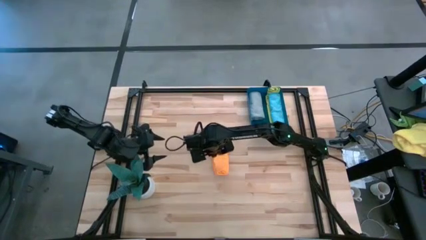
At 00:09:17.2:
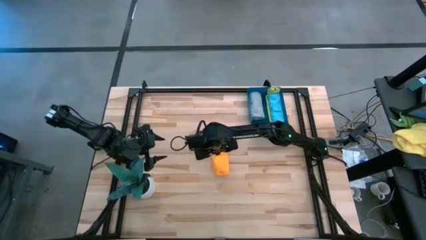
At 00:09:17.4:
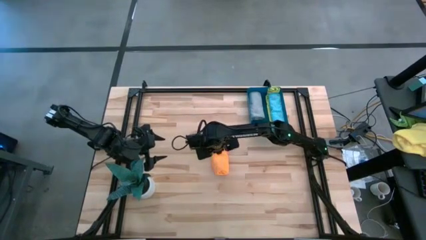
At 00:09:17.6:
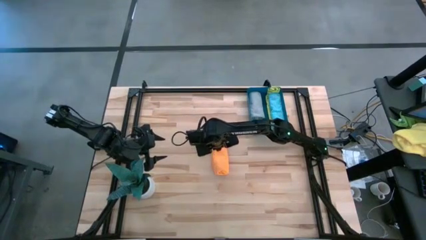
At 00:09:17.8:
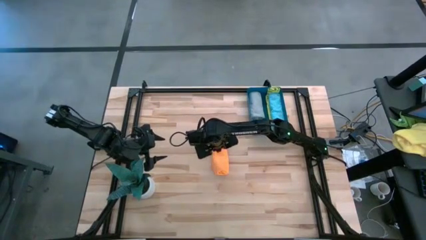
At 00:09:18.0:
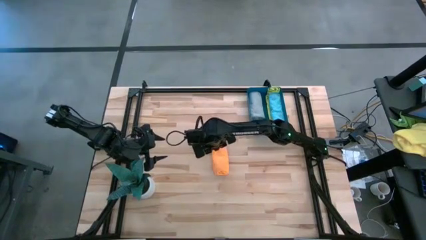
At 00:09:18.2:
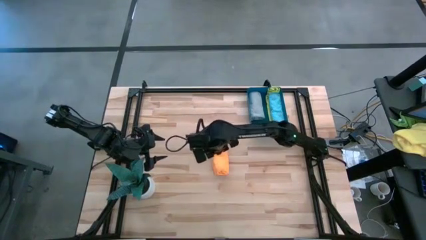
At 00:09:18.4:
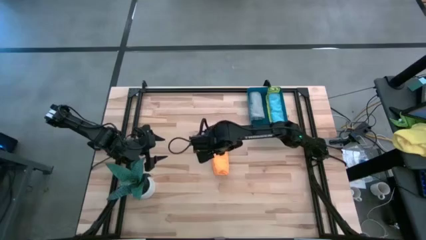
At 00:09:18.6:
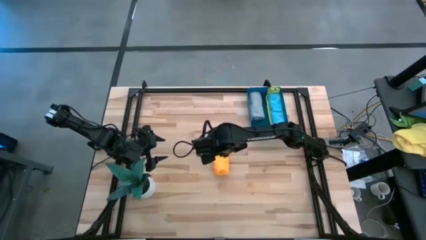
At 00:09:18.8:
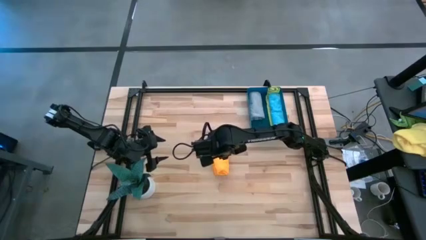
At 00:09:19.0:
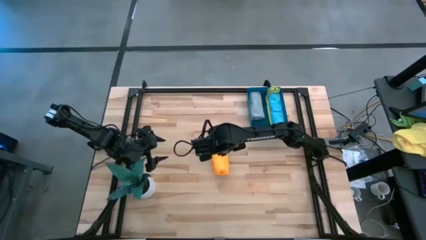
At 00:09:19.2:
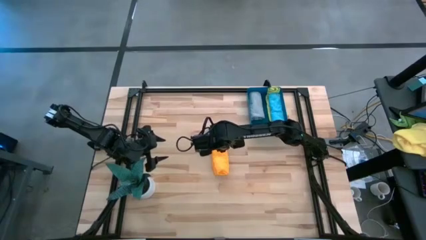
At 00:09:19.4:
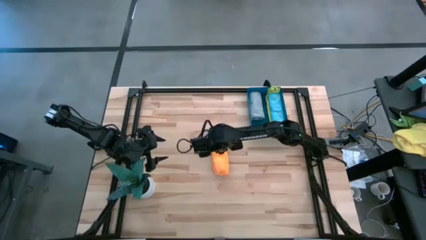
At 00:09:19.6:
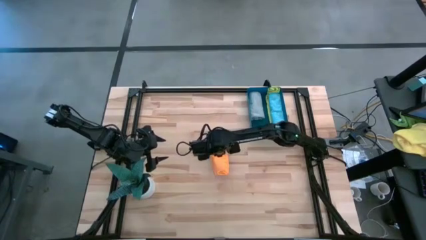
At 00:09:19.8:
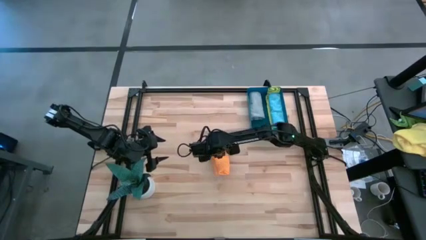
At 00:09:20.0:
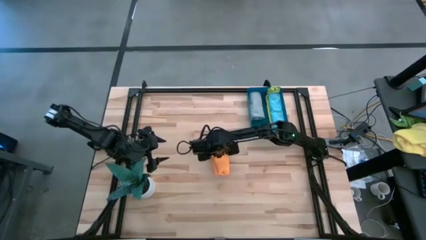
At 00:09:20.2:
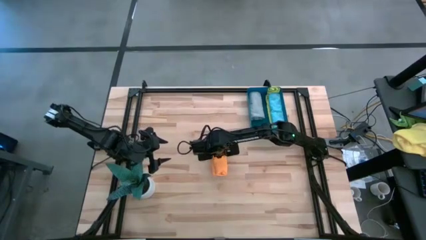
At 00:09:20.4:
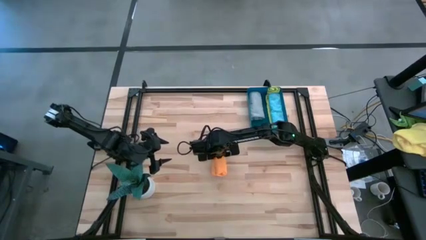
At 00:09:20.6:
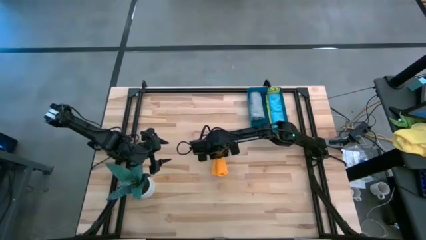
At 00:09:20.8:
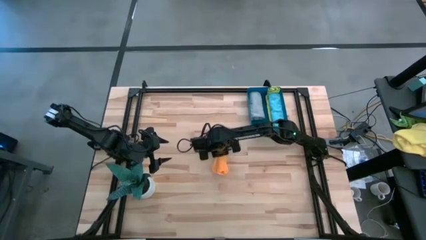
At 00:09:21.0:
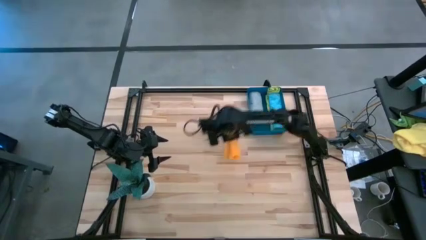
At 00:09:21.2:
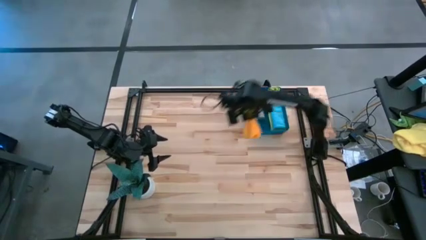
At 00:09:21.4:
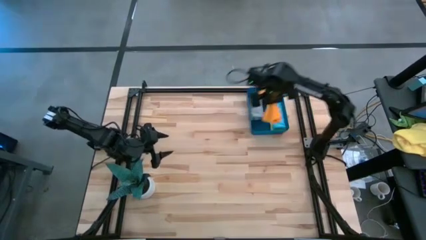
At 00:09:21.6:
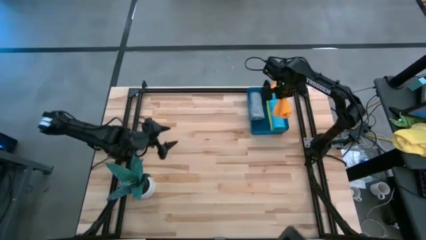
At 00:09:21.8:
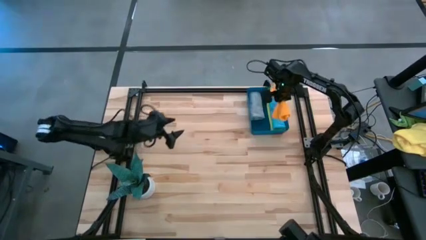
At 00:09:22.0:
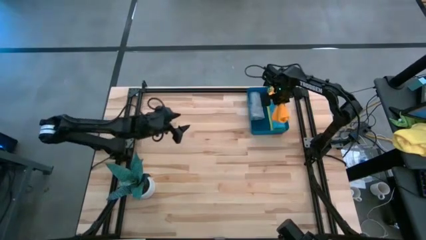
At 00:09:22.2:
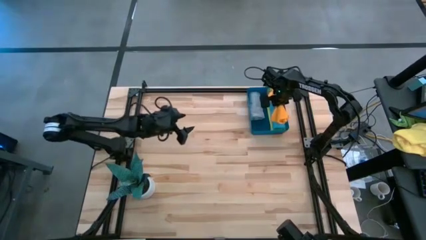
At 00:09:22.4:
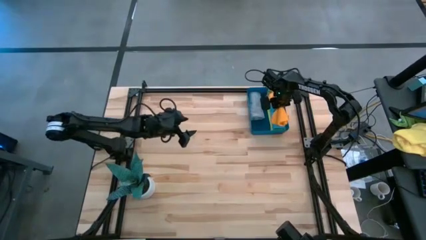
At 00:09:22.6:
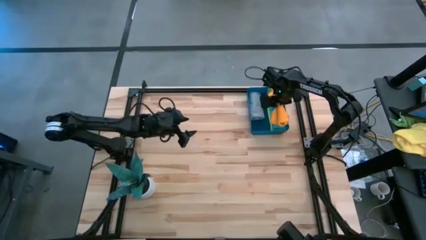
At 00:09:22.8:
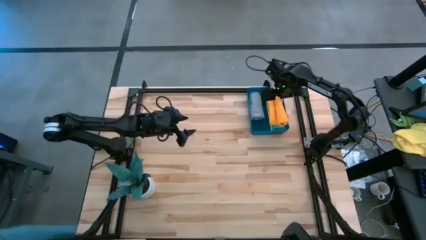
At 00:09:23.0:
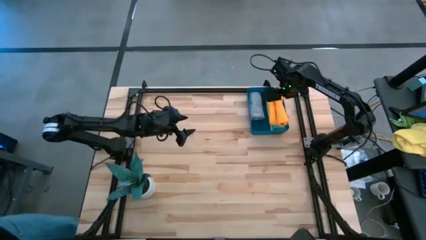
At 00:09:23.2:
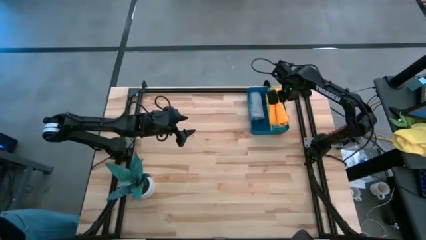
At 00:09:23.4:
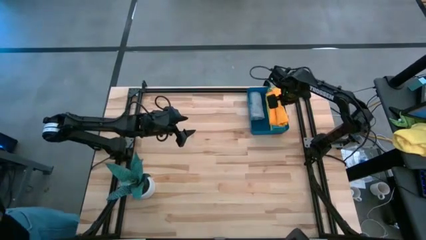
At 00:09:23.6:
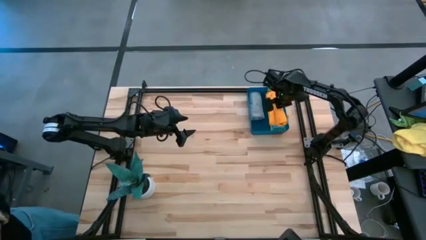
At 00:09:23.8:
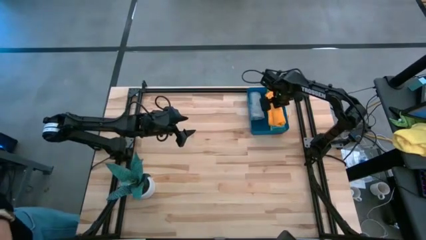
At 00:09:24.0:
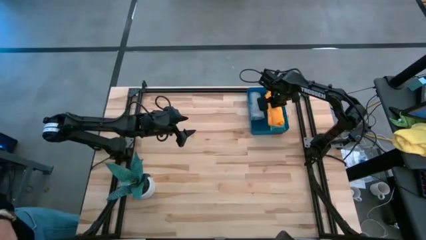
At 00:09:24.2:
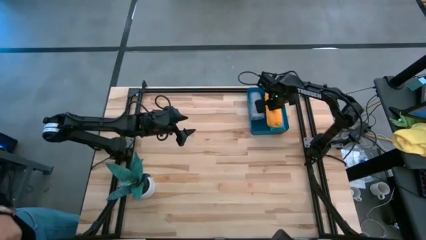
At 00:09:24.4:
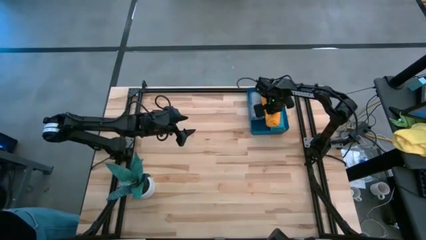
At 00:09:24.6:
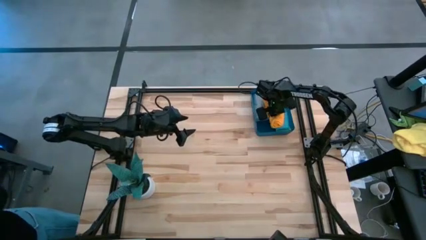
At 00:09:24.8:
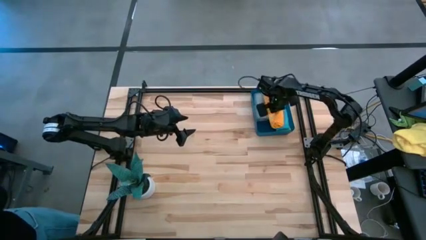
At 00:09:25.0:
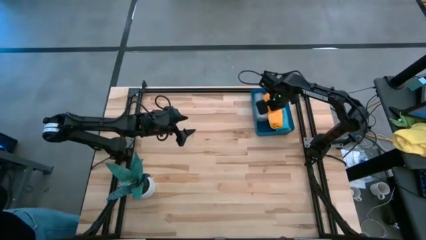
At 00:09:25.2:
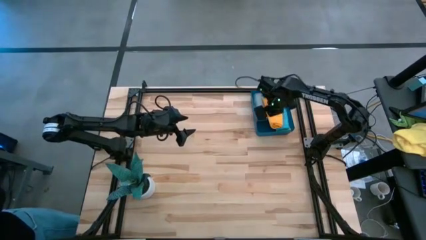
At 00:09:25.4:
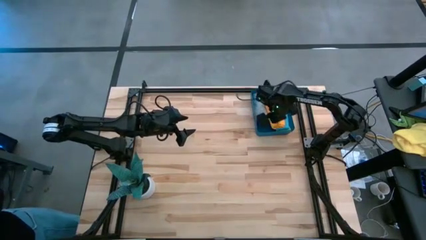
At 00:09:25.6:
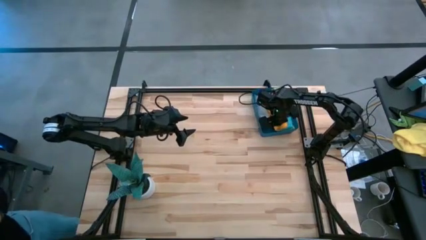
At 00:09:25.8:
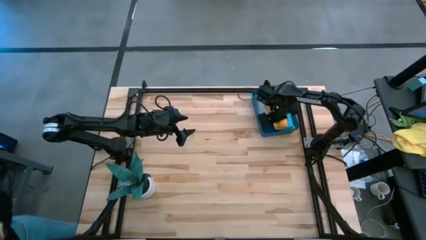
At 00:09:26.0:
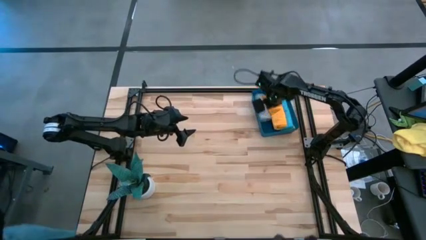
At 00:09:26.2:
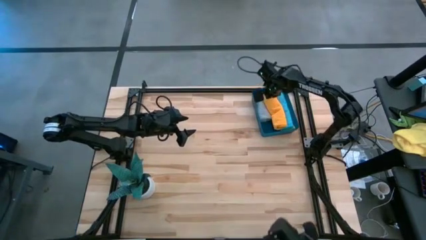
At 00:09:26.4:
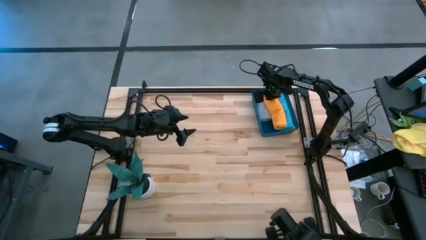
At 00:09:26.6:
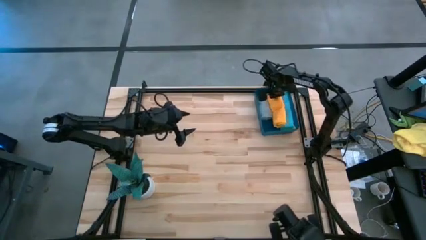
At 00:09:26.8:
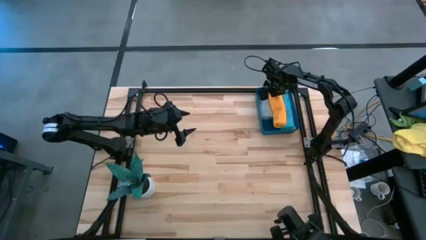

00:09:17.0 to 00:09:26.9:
Task: Roll microfiber towels into tight, uniform cylinder then place into a basket
Put the orange towel into the blue bin

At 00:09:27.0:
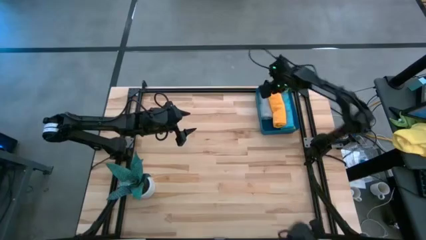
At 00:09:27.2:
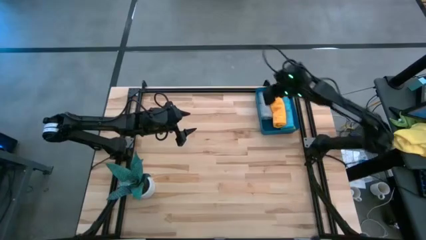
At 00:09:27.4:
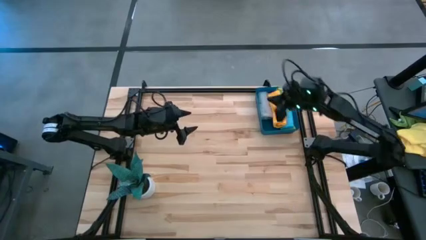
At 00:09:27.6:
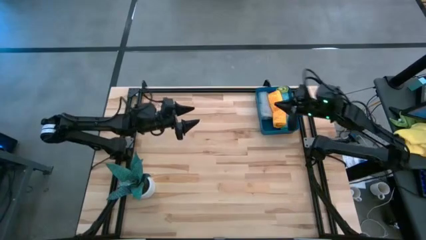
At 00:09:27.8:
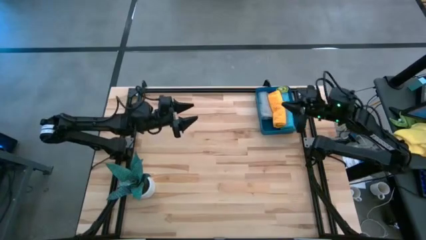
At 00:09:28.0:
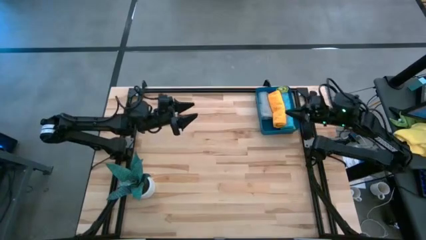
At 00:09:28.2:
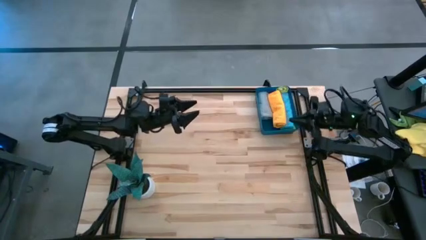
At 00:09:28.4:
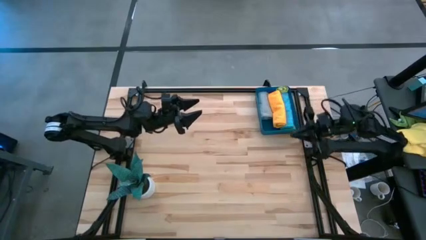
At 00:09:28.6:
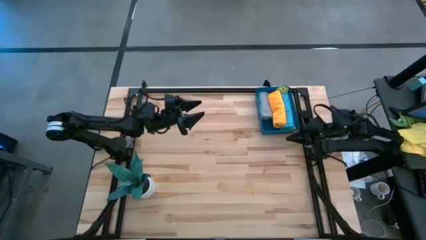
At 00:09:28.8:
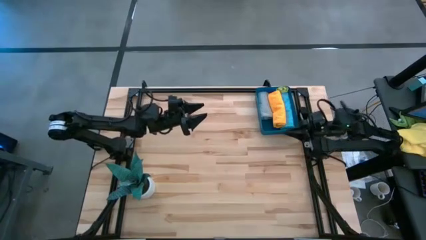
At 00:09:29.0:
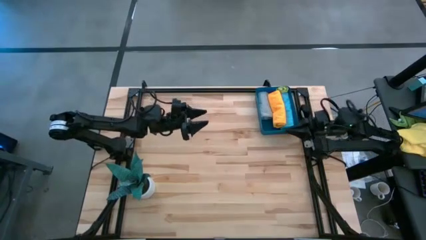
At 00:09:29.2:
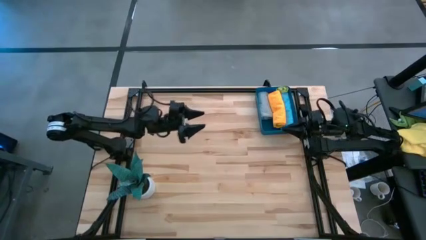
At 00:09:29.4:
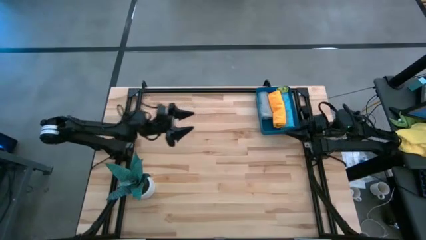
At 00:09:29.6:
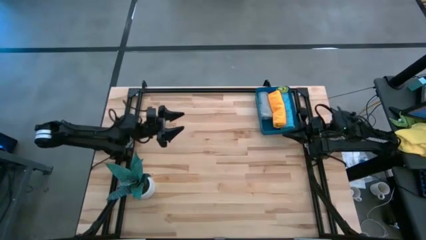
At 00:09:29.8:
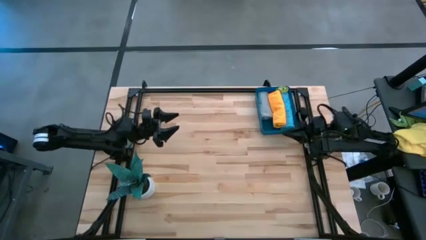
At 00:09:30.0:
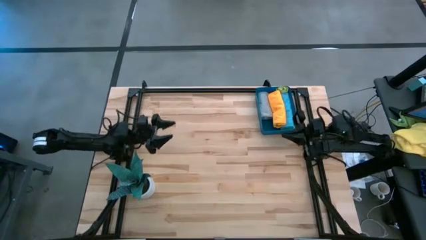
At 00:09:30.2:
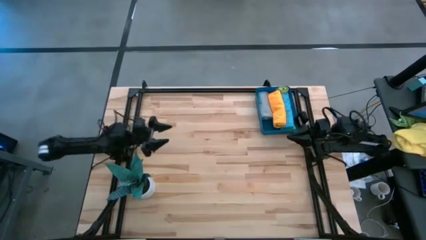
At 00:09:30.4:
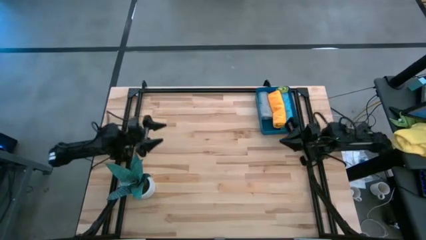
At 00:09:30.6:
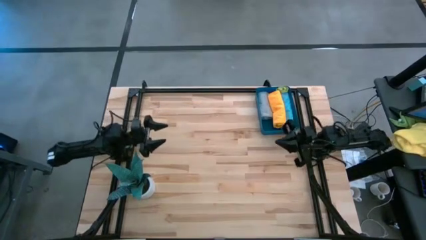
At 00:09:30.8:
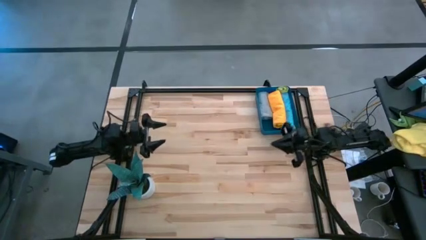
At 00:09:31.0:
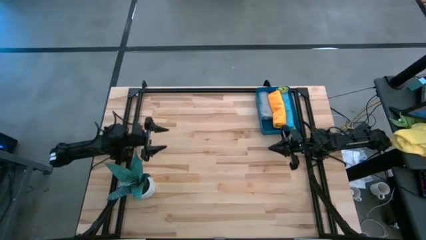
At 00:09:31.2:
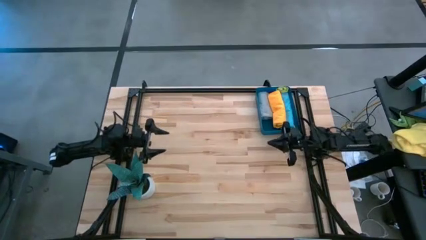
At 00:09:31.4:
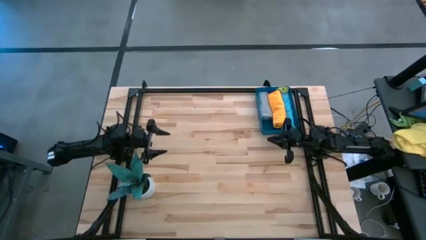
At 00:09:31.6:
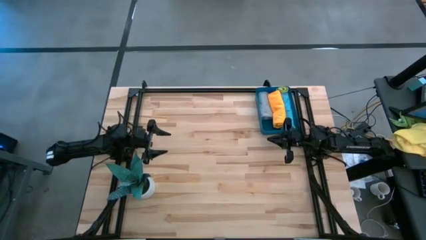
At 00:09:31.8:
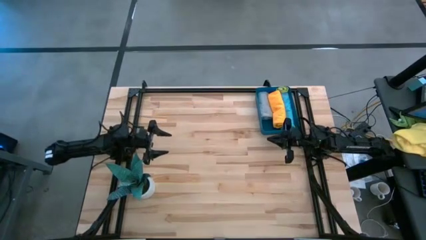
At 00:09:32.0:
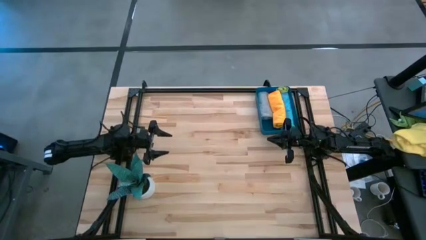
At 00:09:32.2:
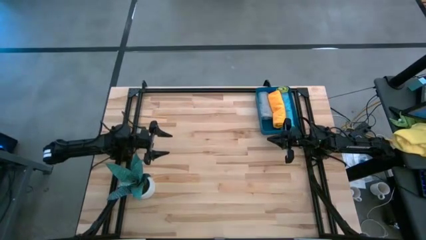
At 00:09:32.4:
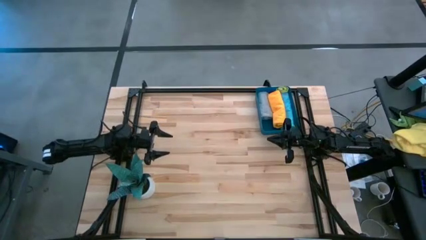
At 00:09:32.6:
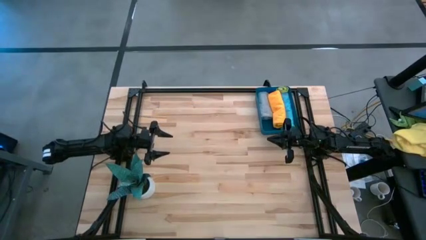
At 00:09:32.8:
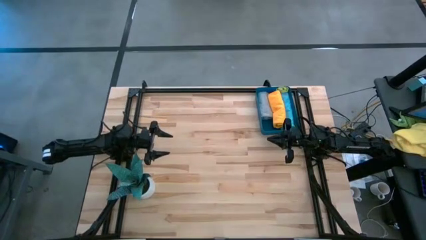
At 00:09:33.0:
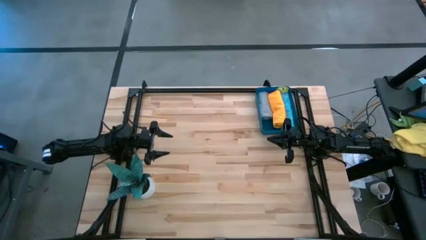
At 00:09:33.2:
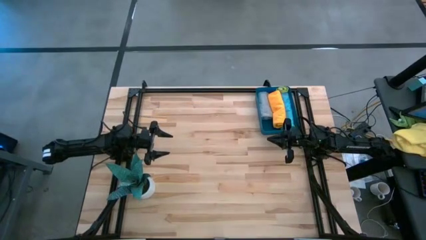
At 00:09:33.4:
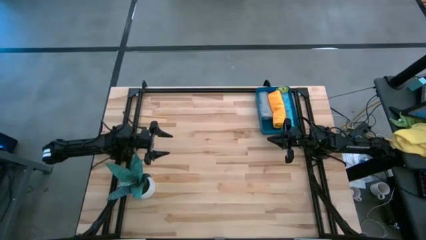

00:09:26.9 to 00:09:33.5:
Return to Home Position
